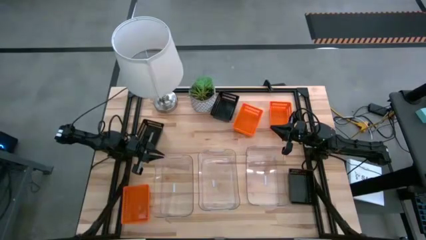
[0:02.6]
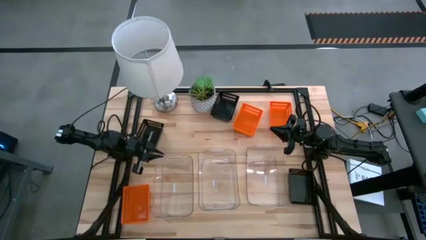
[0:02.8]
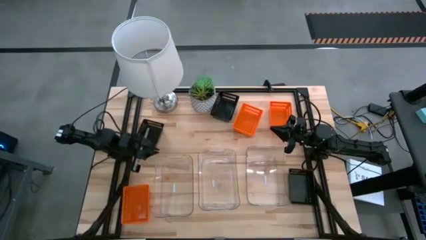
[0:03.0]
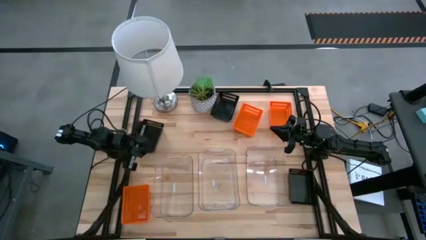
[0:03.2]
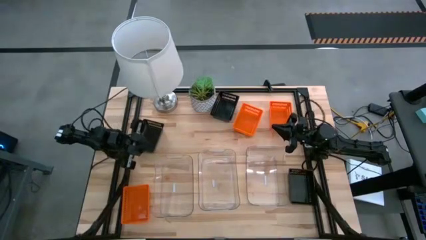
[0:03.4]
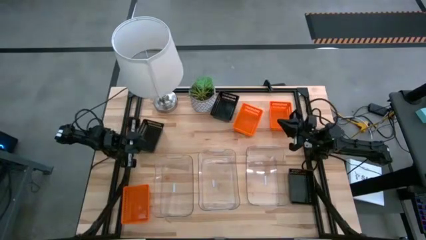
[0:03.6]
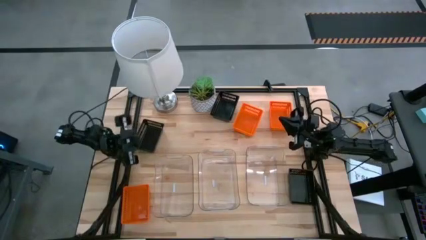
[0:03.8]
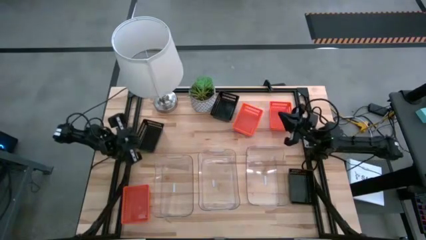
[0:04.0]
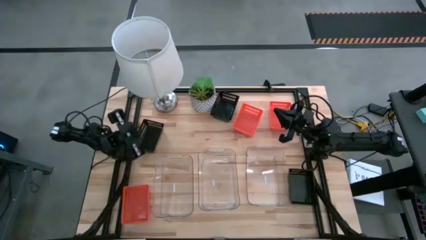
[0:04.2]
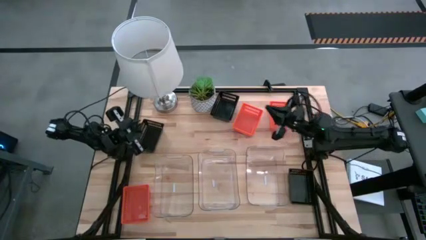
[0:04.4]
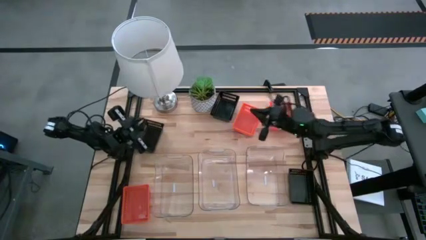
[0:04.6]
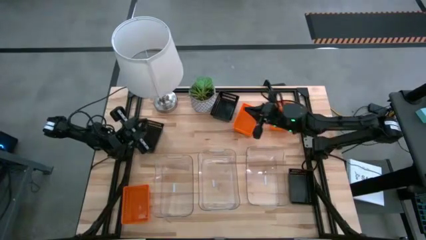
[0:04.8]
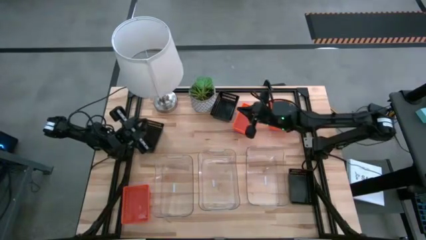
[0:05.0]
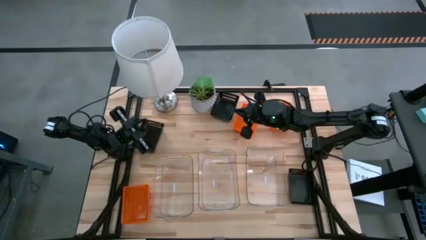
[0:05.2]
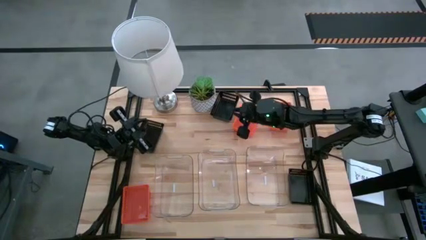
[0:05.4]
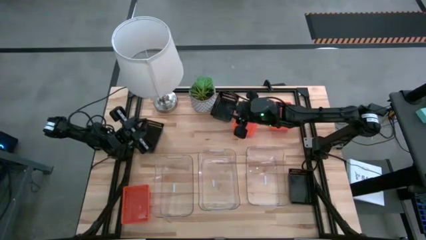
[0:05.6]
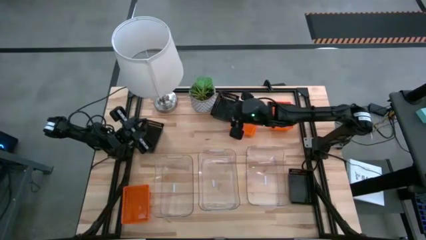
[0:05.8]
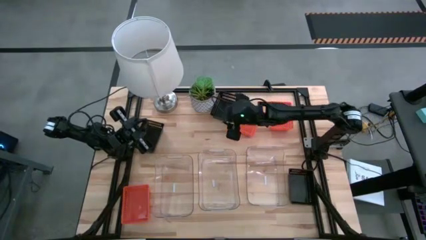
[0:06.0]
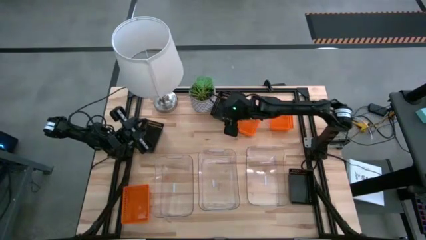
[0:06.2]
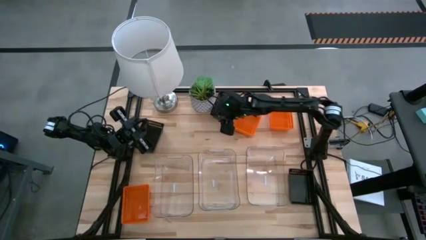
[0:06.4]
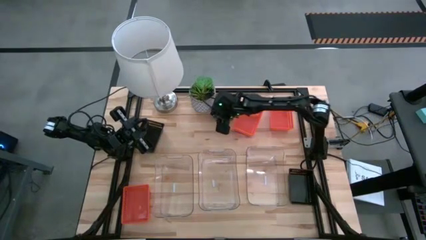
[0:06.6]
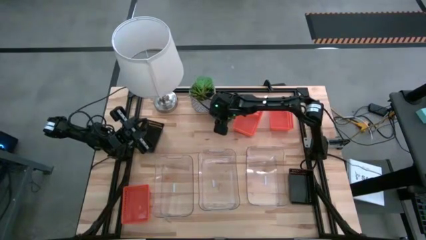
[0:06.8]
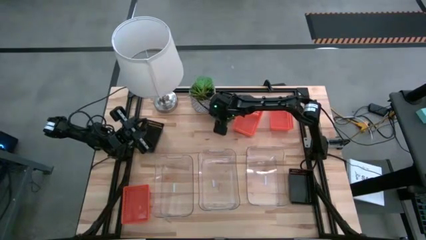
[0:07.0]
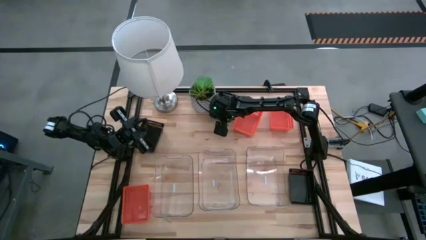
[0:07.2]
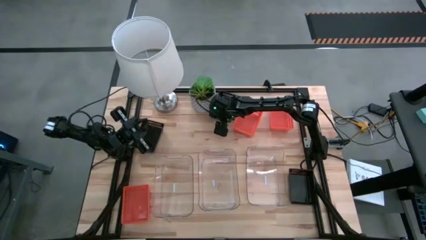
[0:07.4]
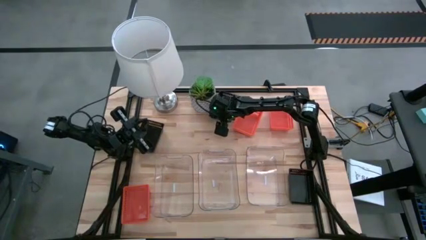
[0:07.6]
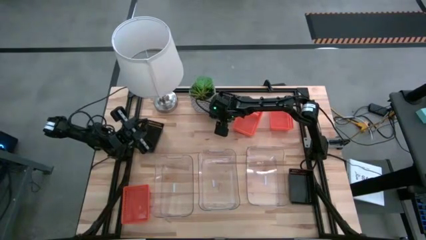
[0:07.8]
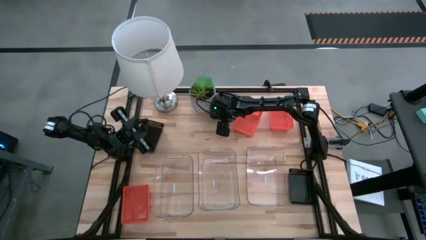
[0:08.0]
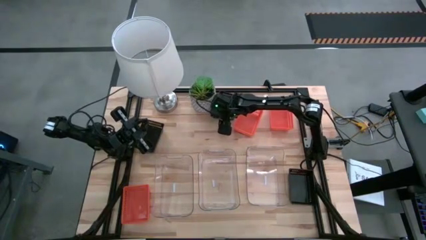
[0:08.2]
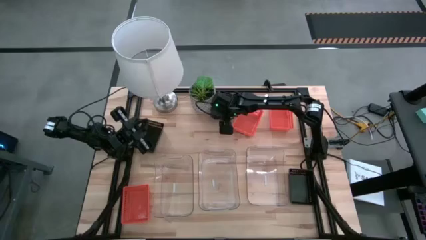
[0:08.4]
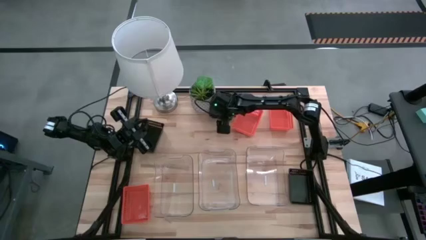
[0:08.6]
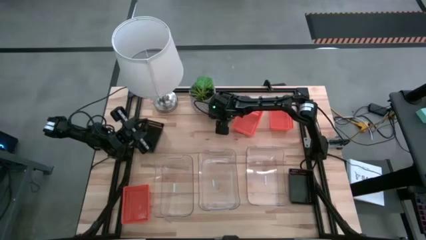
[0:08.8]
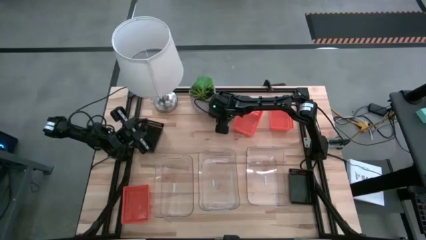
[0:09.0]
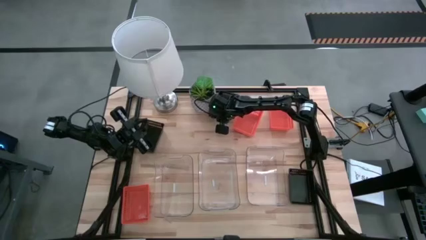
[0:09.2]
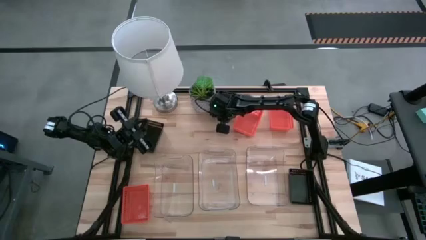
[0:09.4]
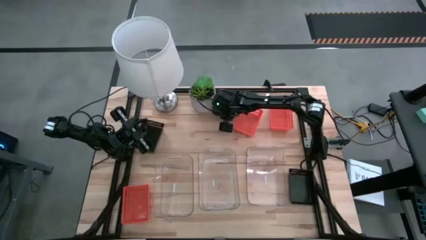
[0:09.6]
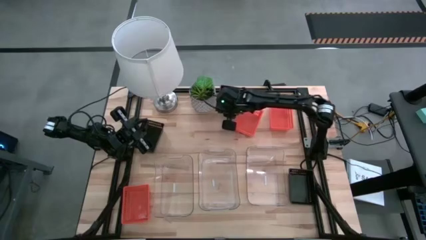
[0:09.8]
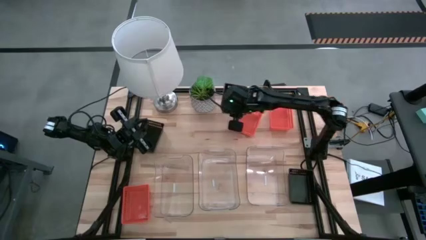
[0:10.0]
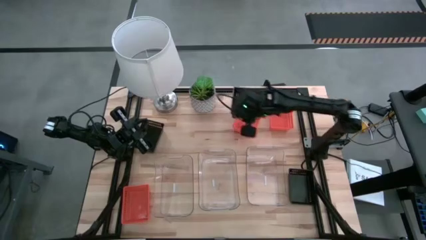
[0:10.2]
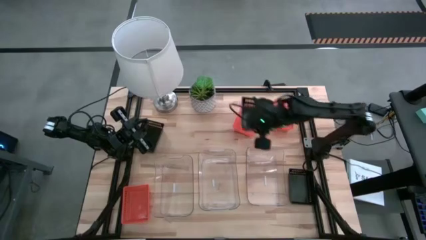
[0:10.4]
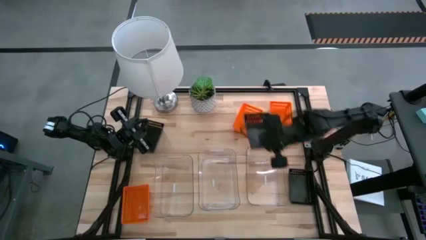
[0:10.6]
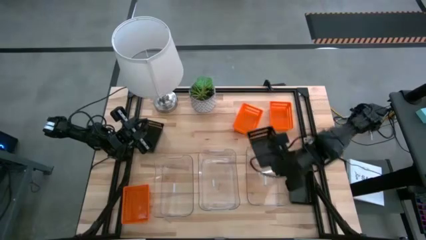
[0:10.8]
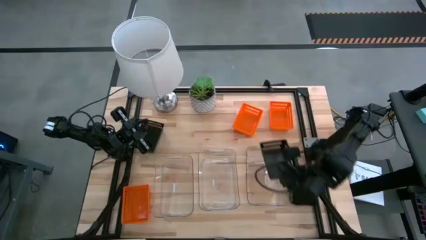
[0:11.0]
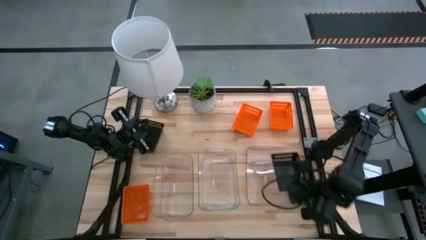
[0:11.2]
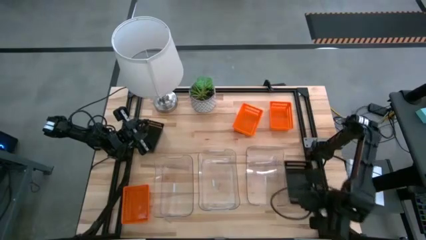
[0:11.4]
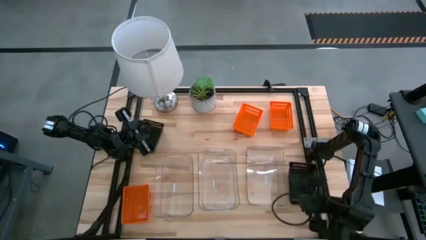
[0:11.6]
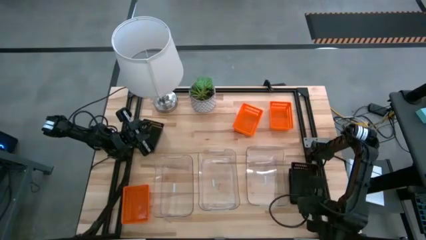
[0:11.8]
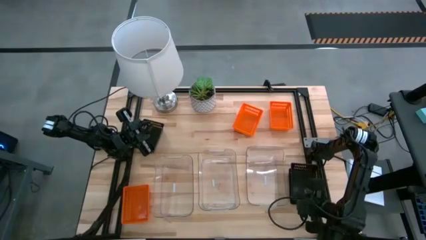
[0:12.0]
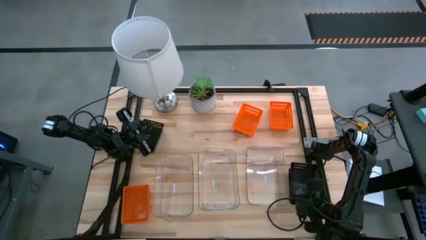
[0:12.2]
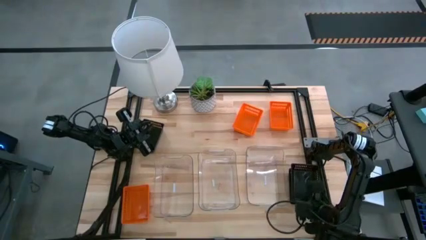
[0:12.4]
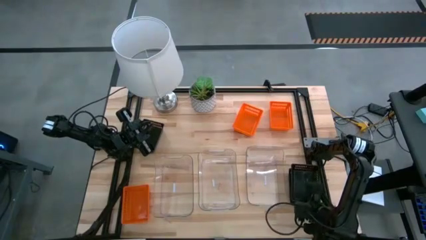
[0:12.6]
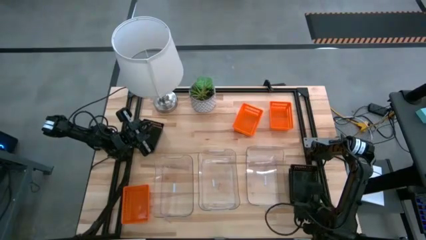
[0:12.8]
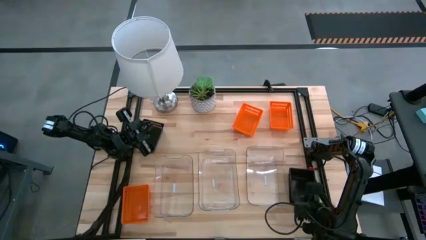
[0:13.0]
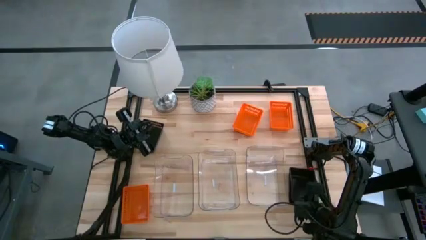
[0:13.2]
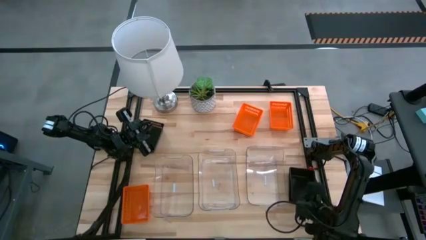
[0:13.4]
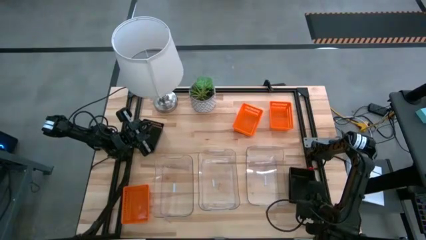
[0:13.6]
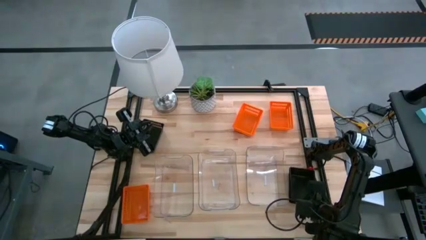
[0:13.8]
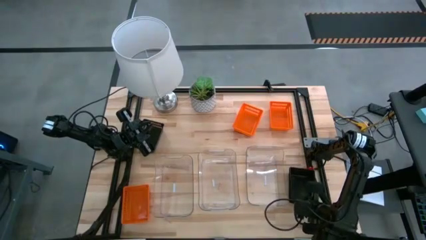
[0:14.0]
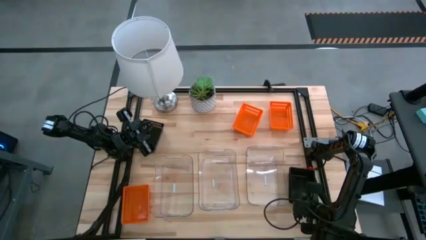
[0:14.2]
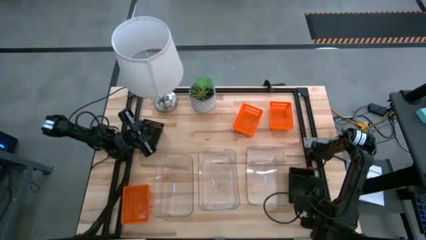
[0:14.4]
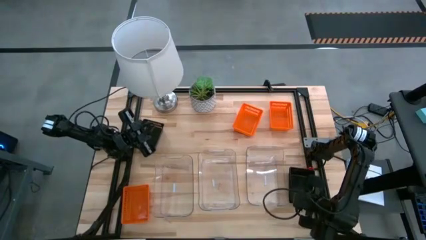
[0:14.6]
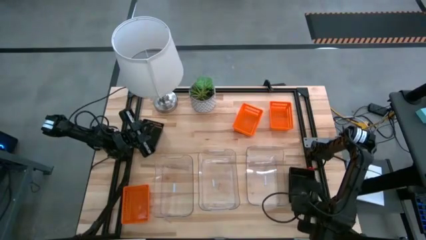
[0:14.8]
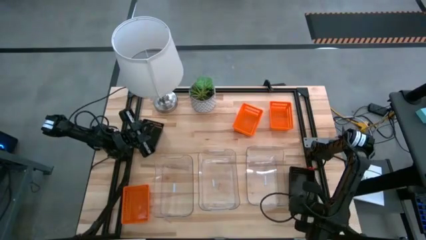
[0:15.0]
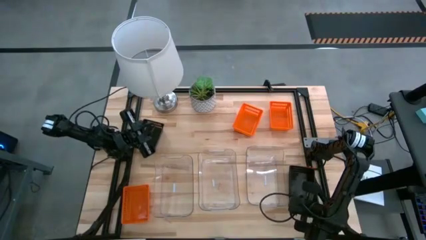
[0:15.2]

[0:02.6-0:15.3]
Stack the top center black bin on the right black bin
